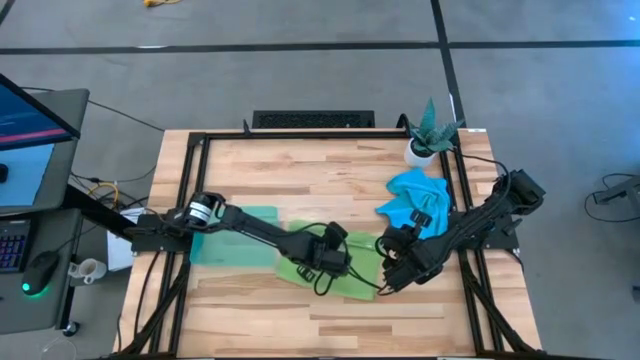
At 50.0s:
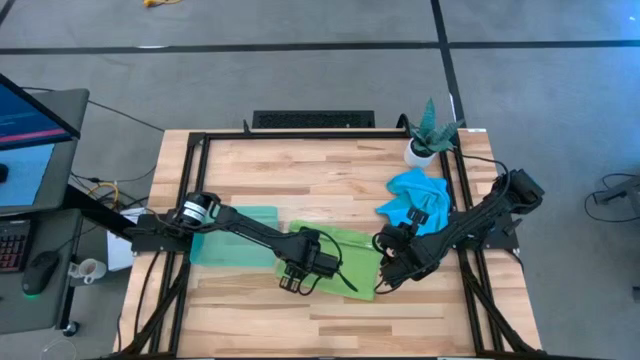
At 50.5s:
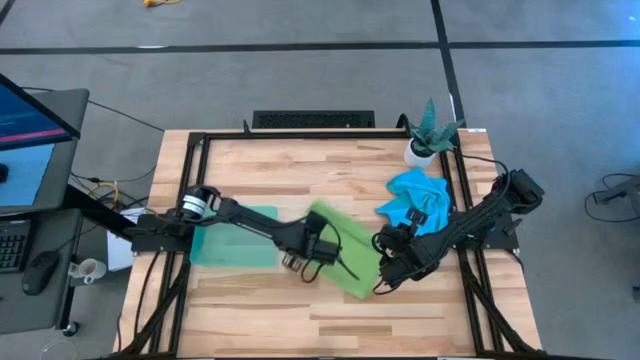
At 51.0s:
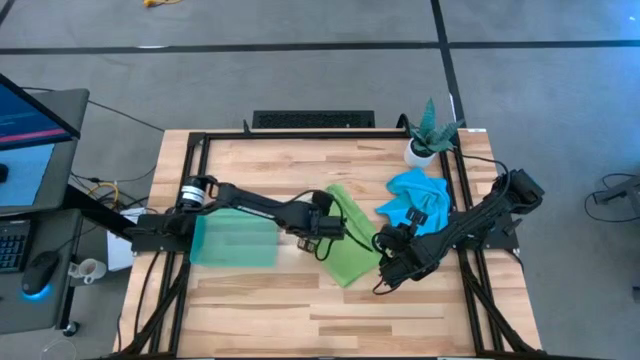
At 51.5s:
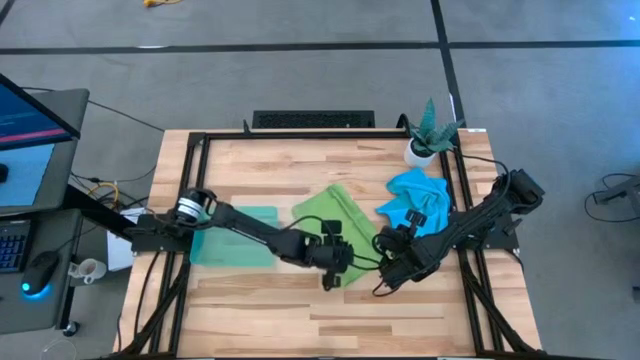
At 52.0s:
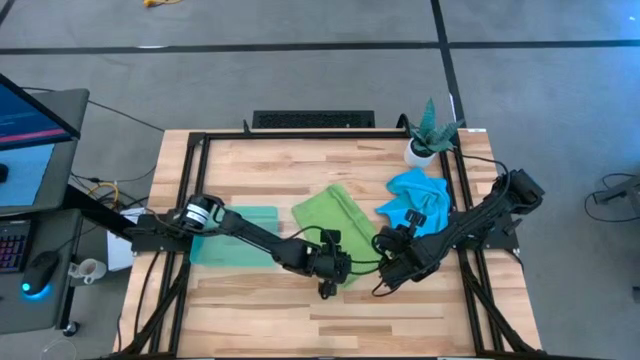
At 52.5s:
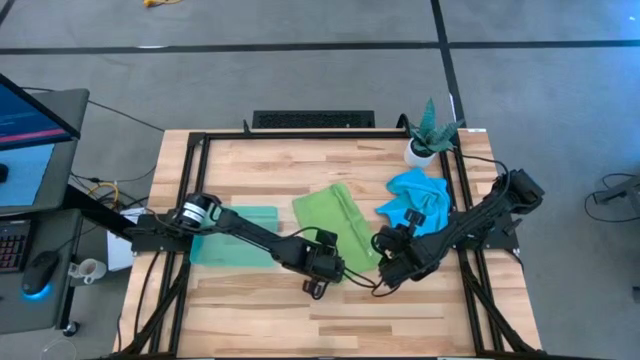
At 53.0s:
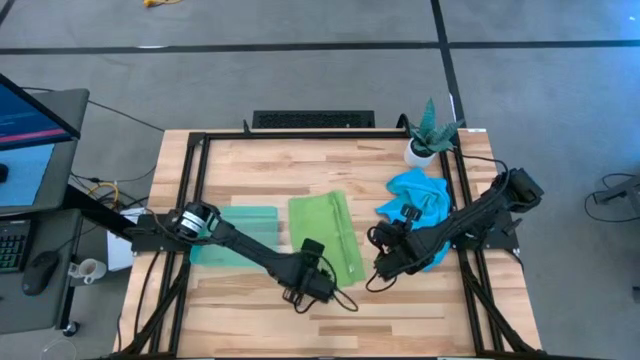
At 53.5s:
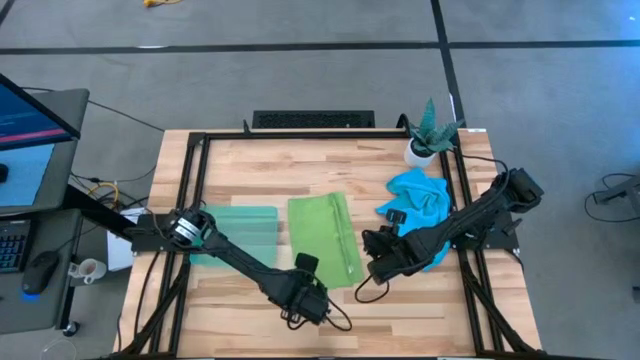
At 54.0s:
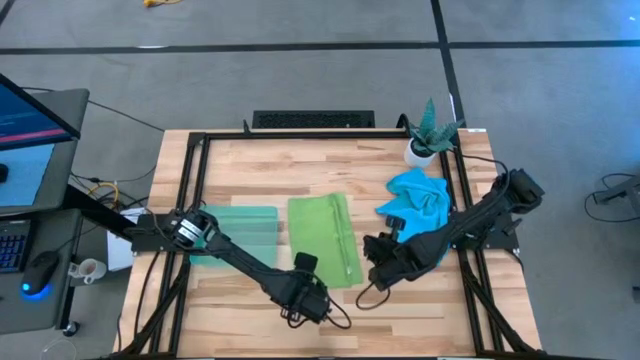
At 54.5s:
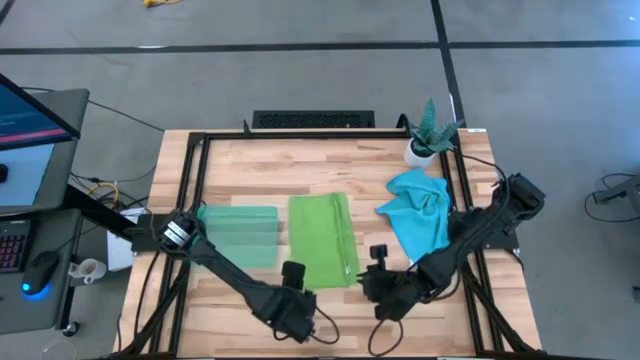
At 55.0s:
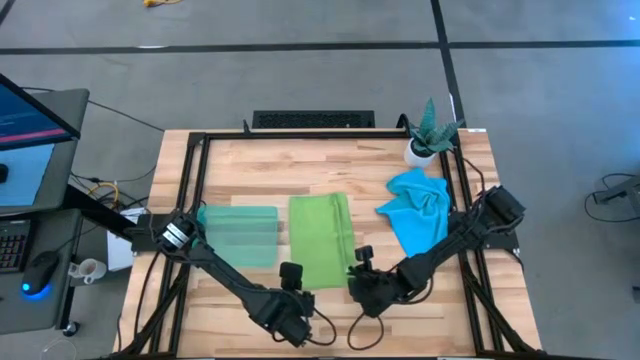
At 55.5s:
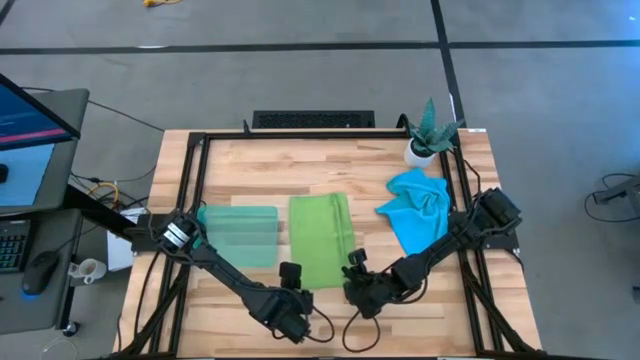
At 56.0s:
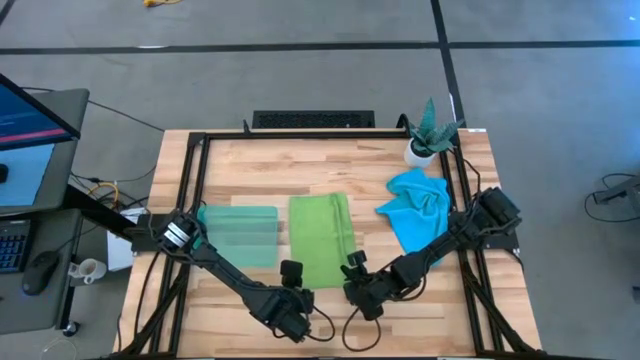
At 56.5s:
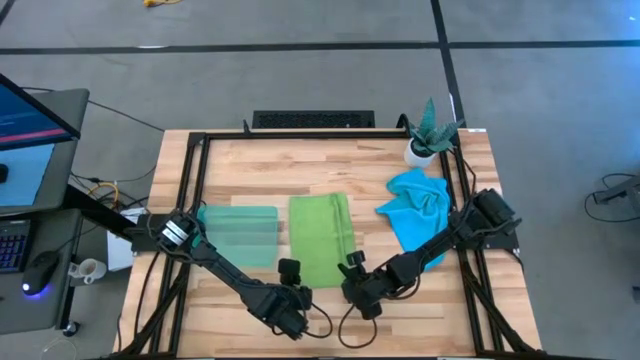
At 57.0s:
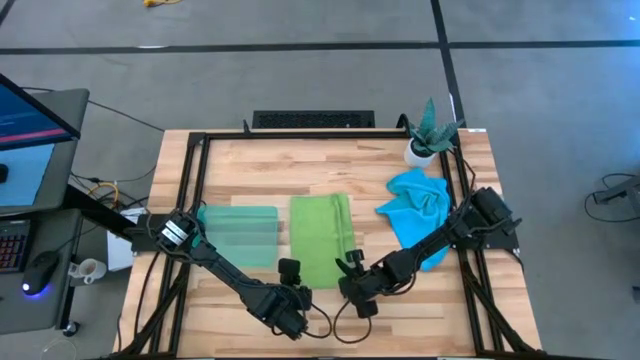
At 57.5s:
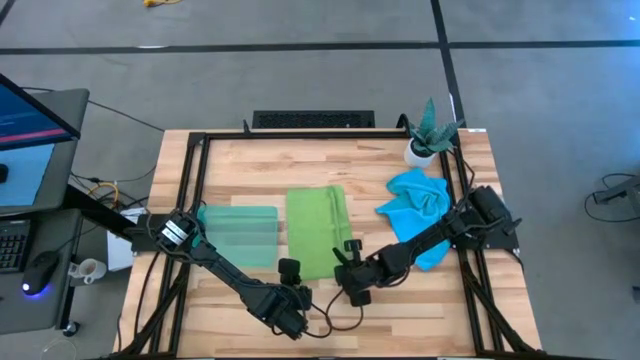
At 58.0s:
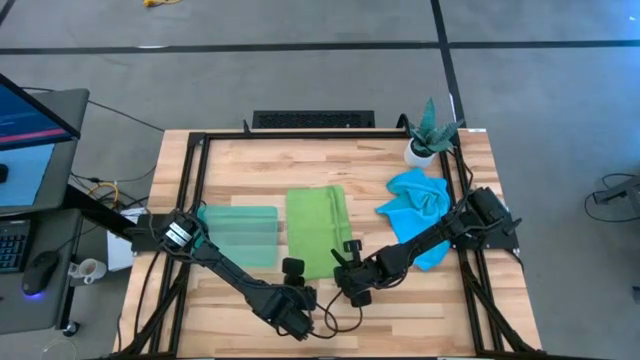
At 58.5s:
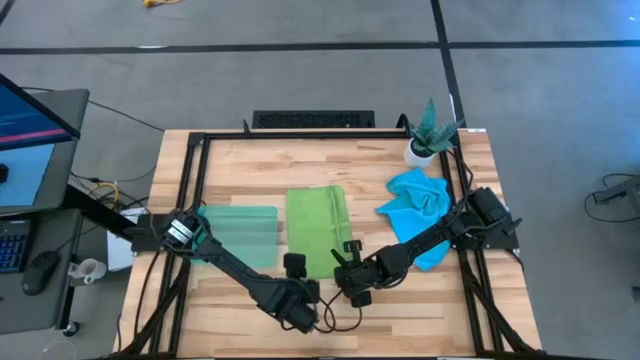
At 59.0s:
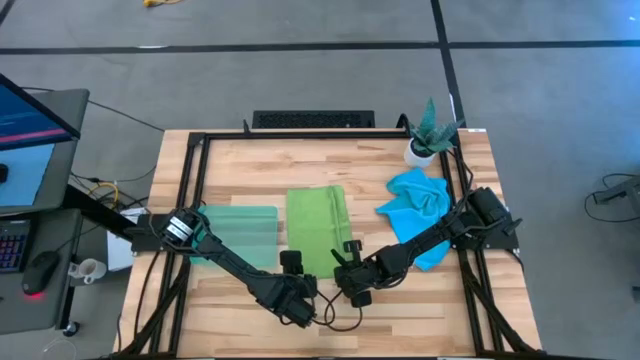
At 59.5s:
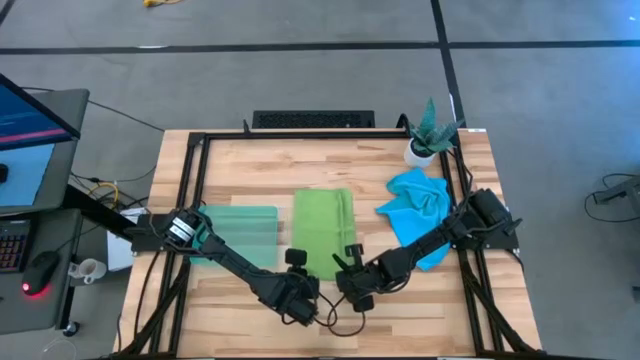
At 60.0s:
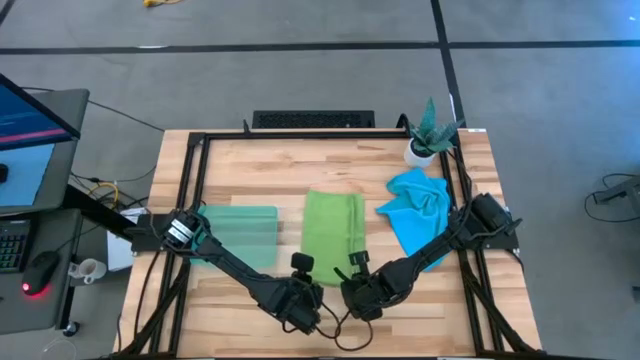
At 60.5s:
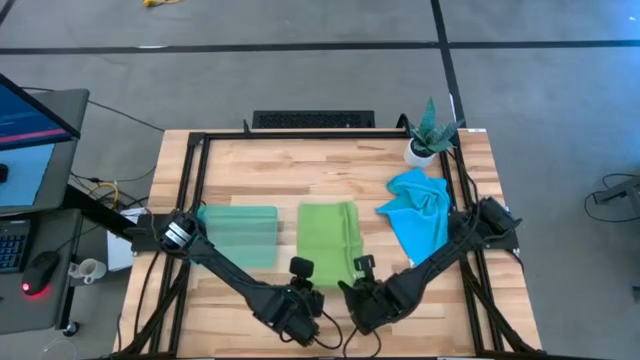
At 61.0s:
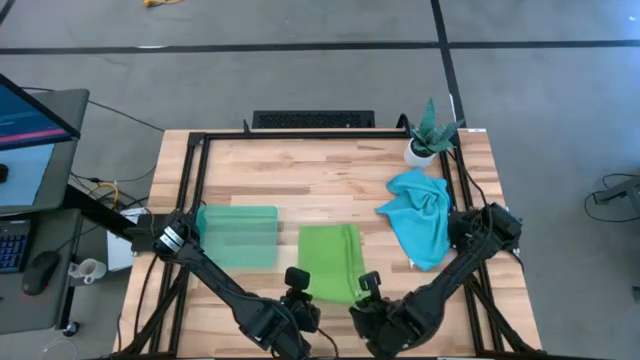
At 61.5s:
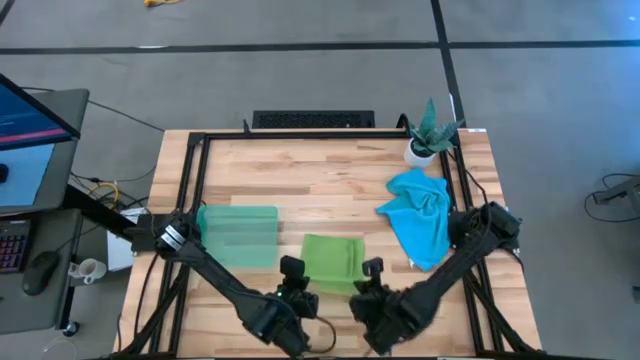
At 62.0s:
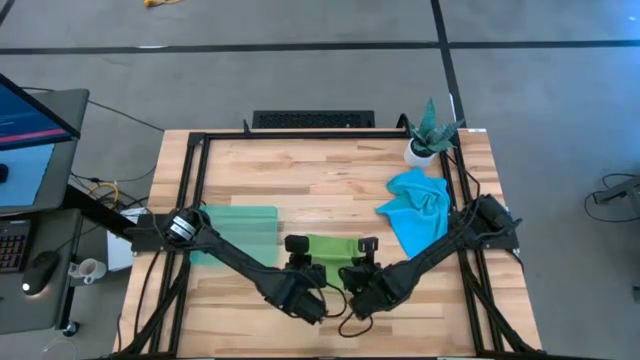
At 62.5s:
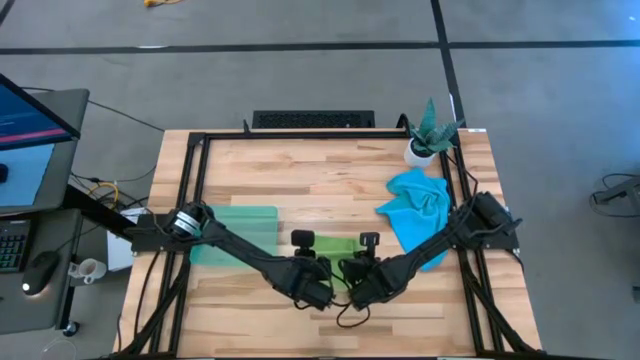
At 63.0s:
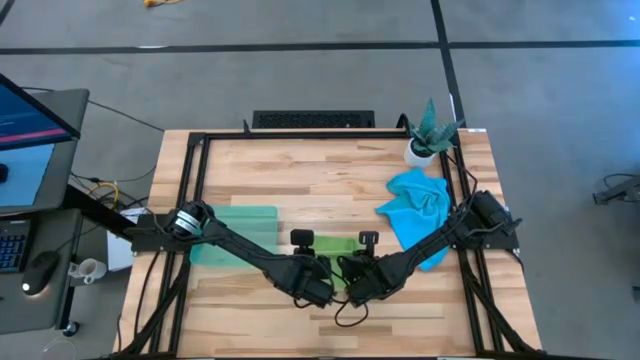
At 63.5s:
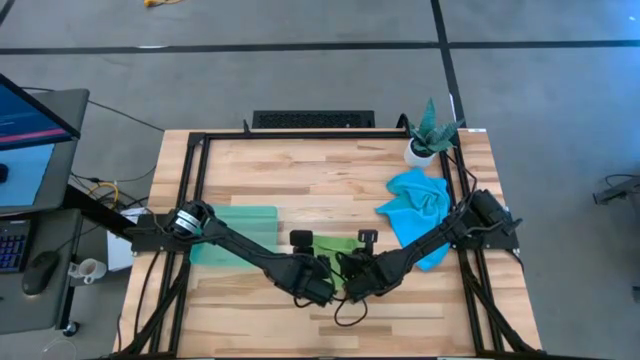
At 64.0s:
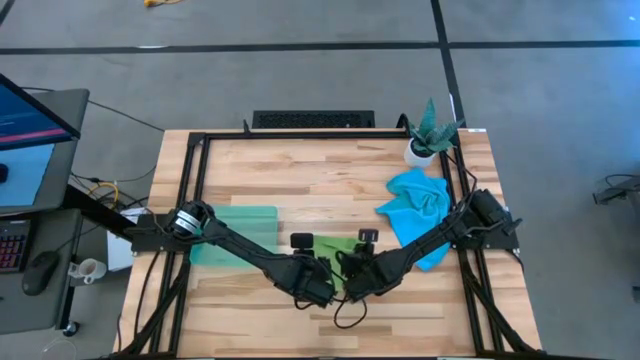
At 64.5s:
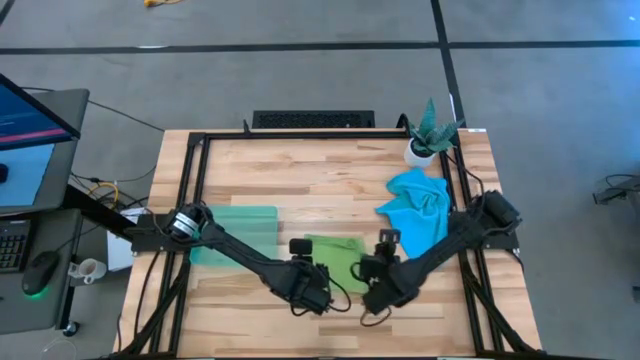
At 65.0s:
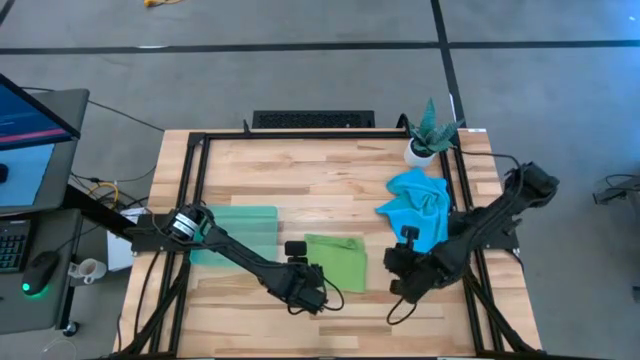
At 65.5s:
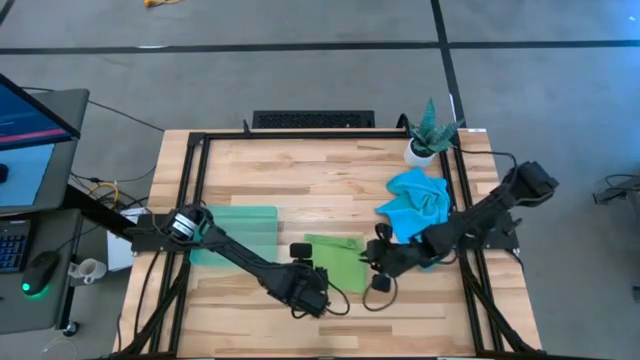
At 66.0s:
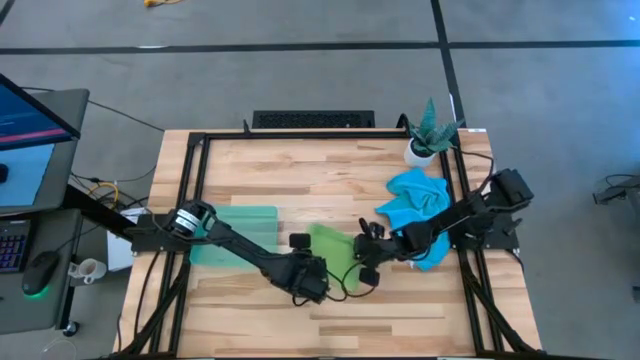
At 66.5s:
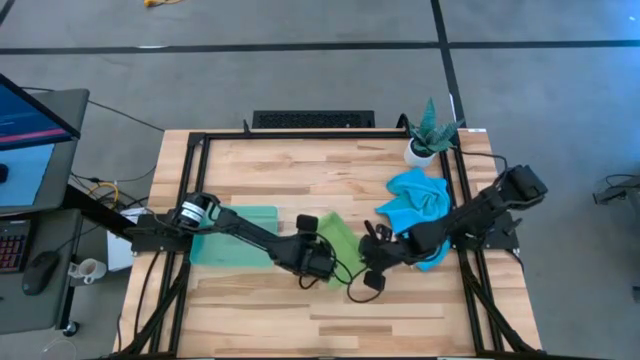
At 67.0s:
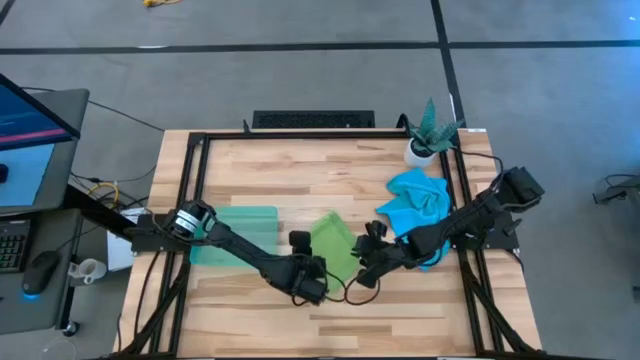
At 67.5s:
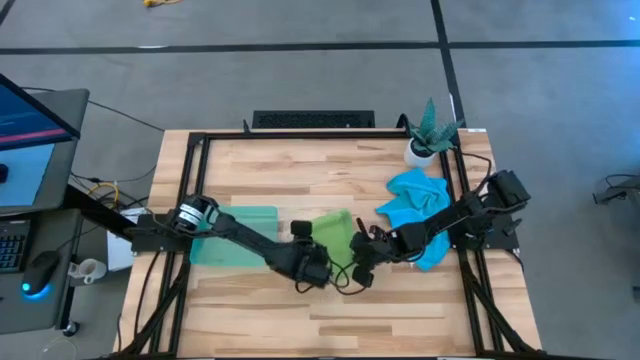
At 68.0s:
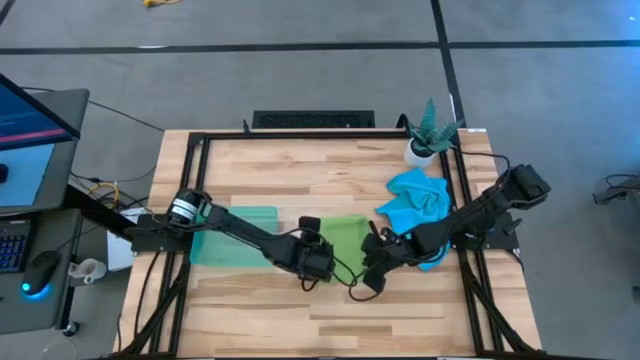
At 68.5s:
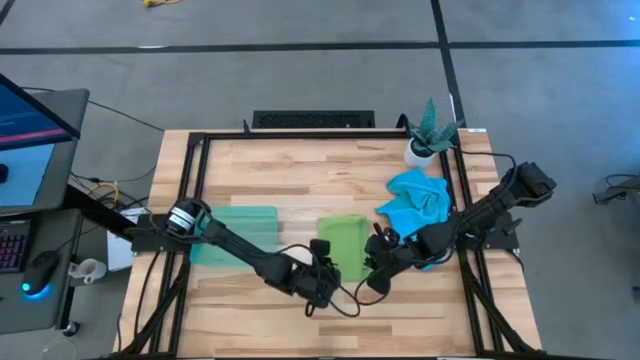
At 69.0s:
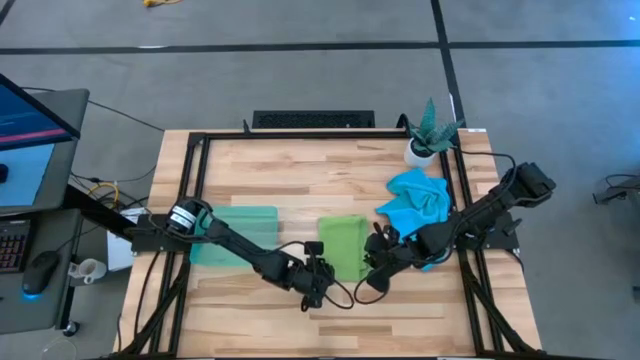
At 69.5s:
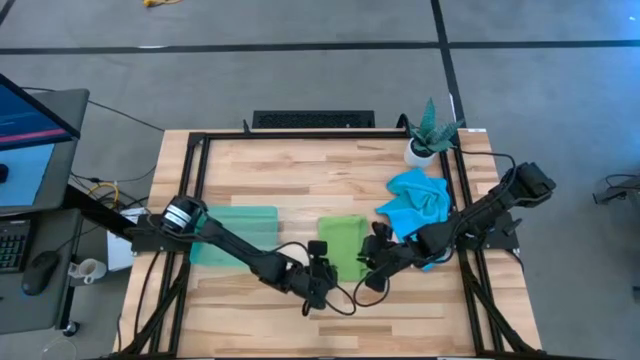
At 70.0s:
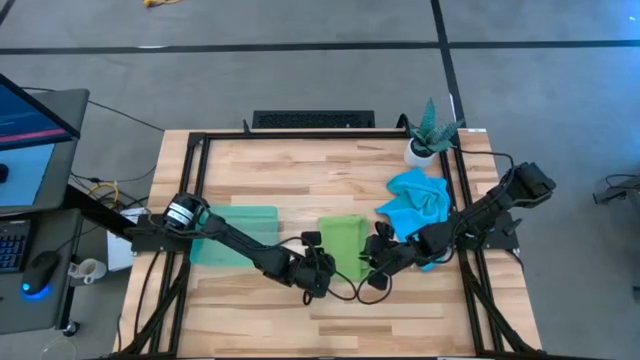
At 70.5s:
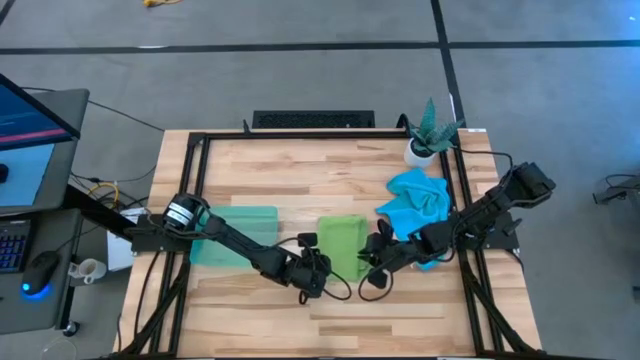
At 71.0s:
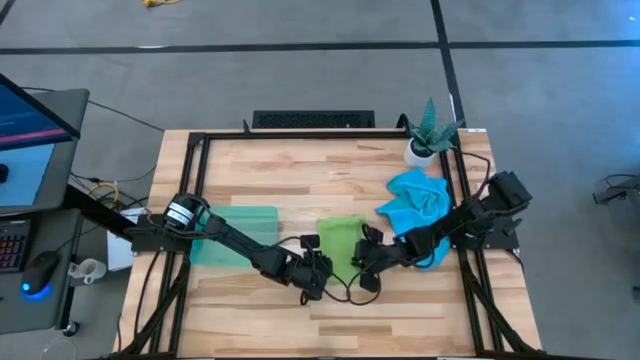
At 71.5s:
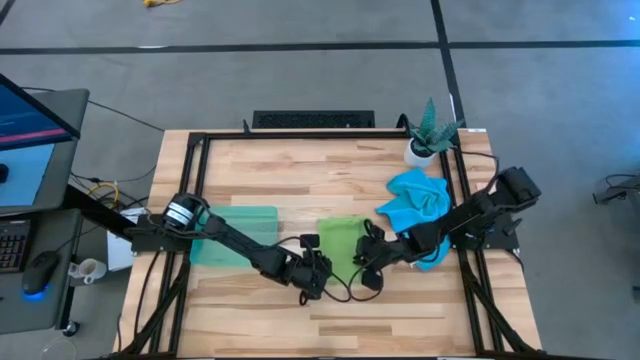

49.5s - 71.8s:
Task: Roll microfiber towels into tight, uniform cylinder then place into a basket
Fold the green towel

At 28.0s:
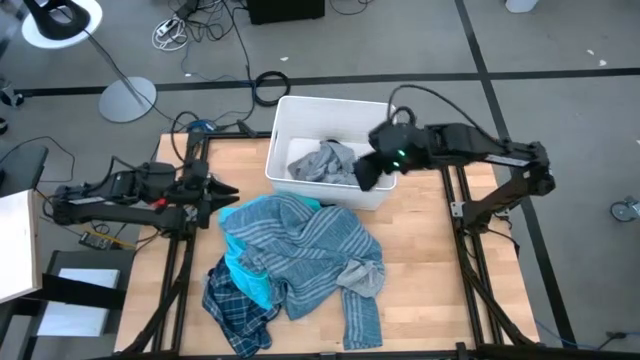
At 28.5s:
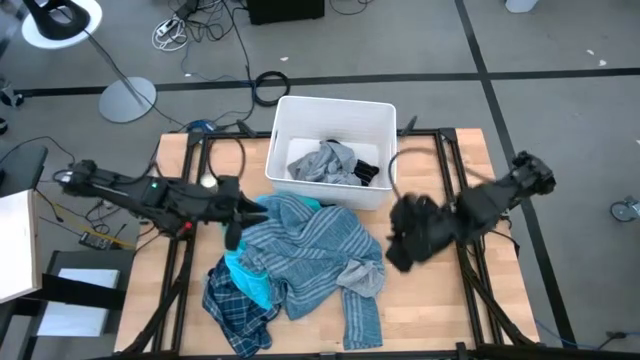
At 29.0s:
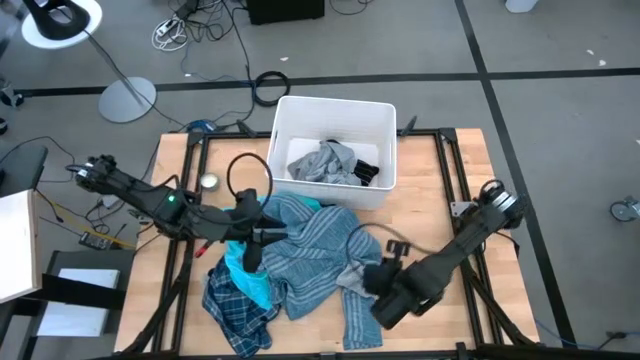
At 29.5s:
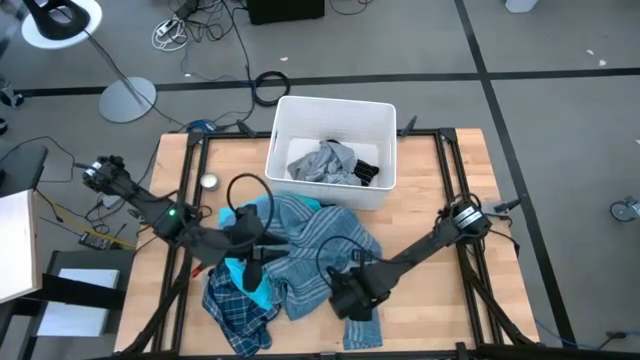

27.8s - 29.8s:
Task: Sort clothes
Put the gray sock into the white bin
